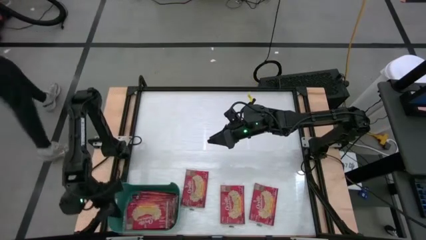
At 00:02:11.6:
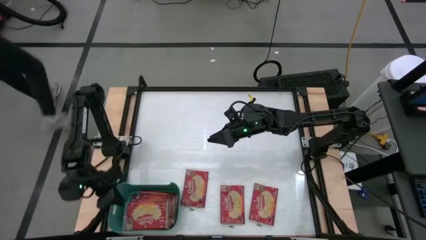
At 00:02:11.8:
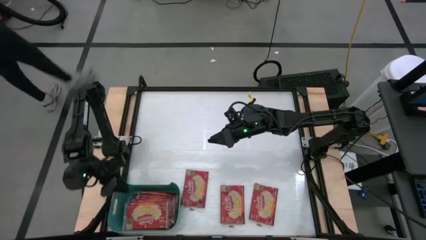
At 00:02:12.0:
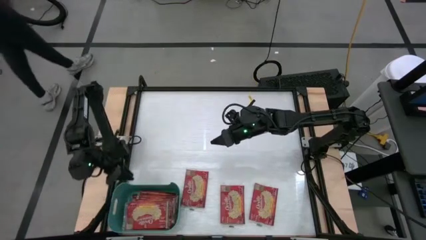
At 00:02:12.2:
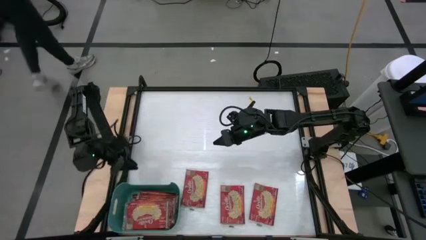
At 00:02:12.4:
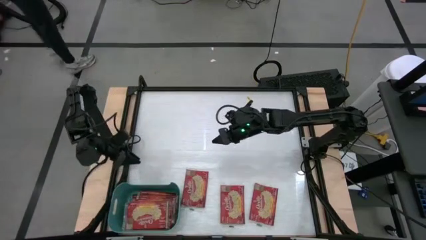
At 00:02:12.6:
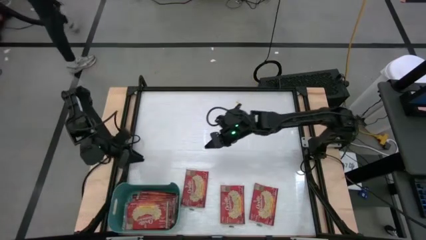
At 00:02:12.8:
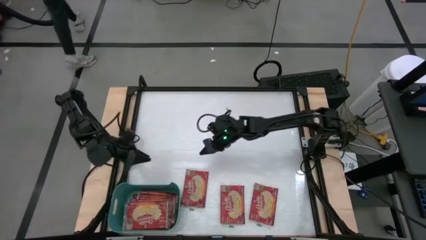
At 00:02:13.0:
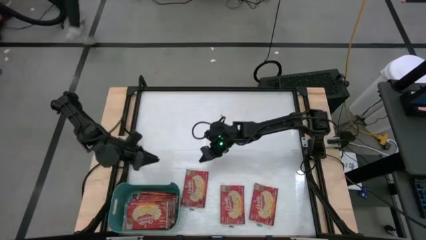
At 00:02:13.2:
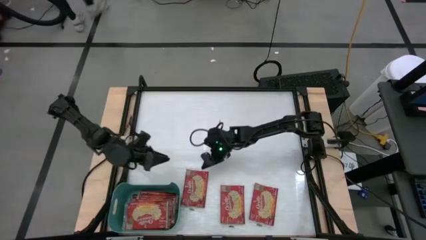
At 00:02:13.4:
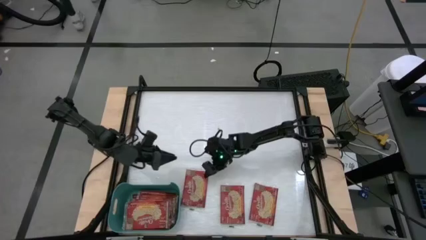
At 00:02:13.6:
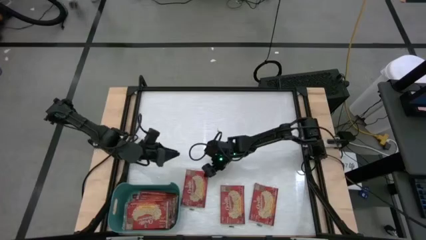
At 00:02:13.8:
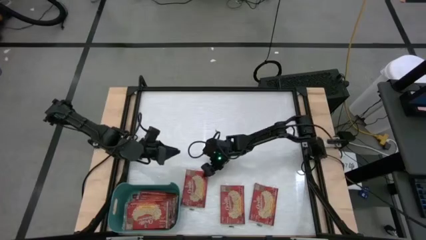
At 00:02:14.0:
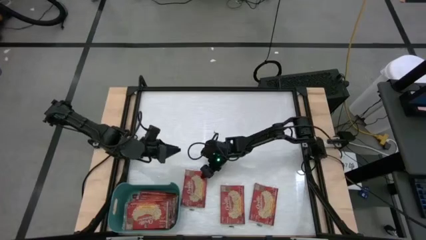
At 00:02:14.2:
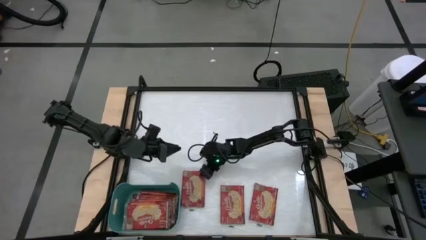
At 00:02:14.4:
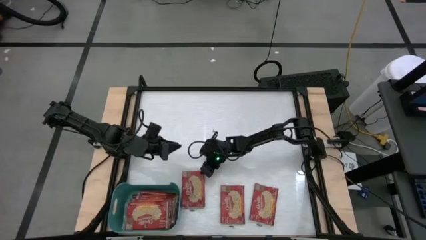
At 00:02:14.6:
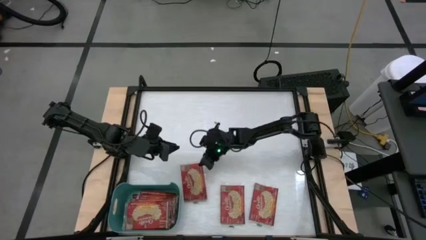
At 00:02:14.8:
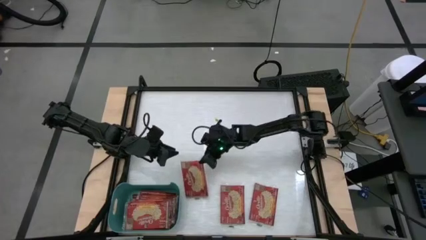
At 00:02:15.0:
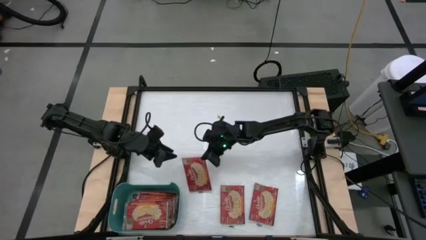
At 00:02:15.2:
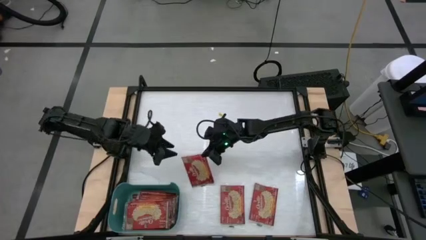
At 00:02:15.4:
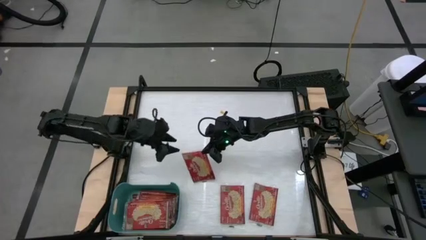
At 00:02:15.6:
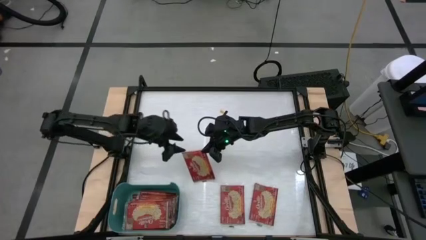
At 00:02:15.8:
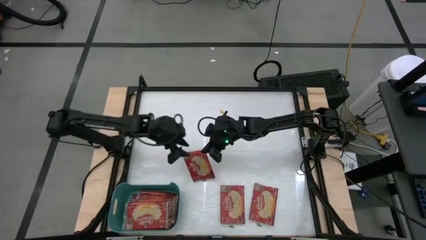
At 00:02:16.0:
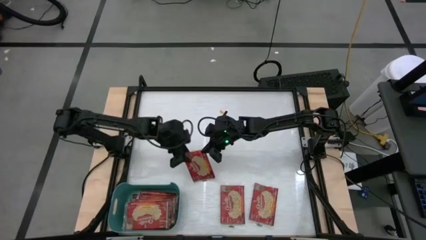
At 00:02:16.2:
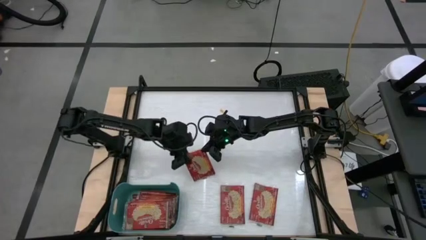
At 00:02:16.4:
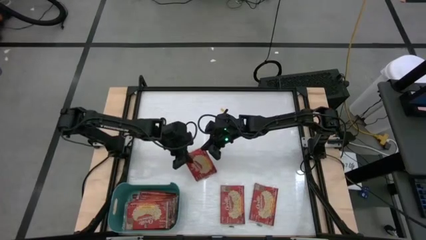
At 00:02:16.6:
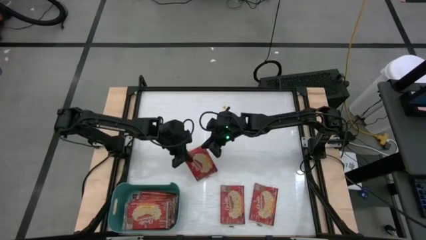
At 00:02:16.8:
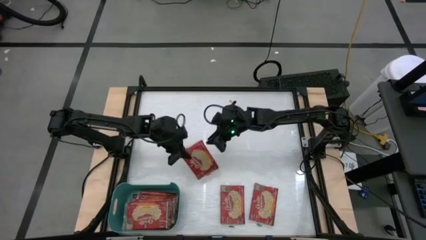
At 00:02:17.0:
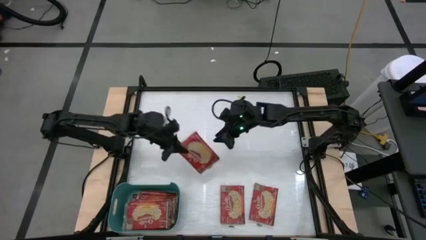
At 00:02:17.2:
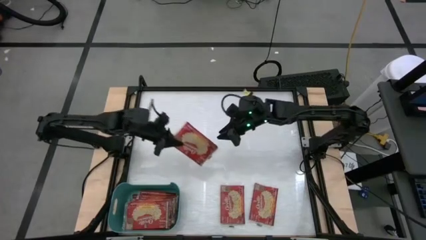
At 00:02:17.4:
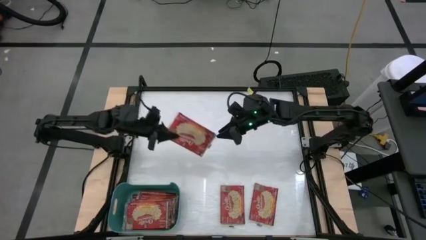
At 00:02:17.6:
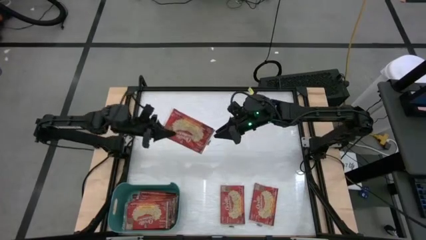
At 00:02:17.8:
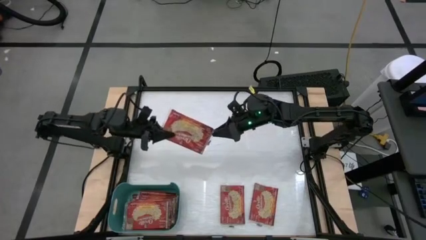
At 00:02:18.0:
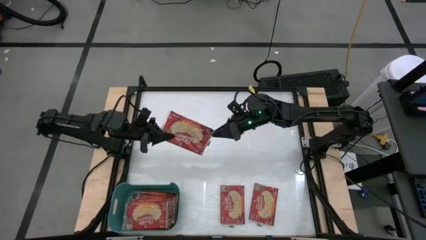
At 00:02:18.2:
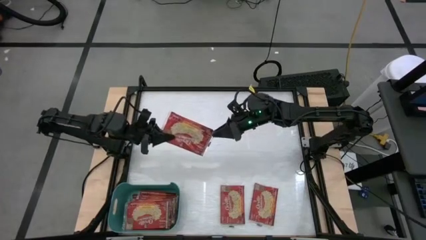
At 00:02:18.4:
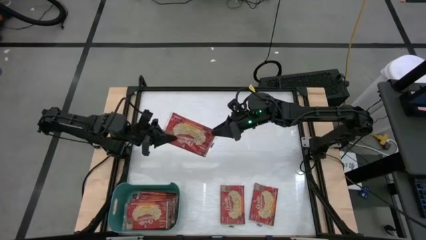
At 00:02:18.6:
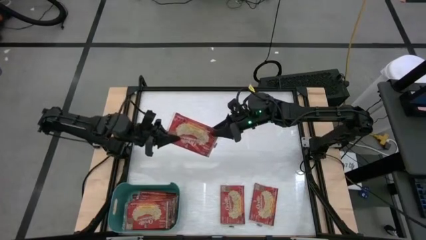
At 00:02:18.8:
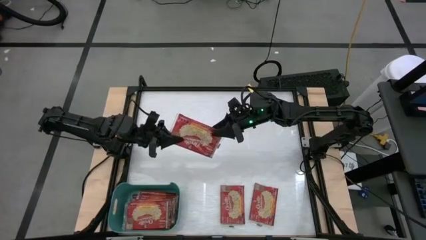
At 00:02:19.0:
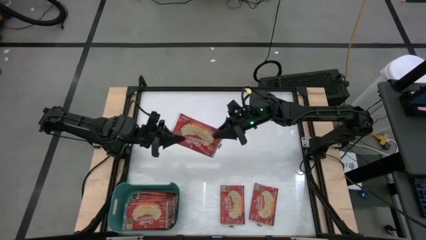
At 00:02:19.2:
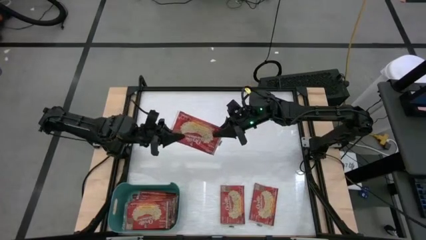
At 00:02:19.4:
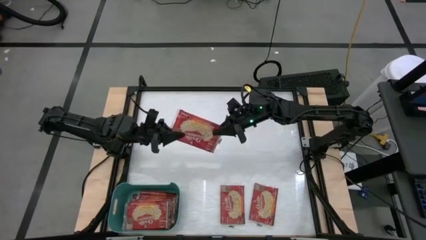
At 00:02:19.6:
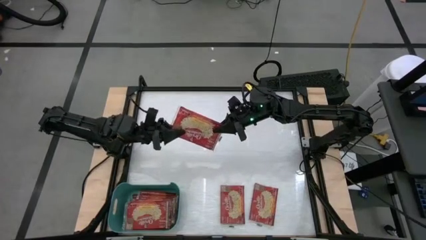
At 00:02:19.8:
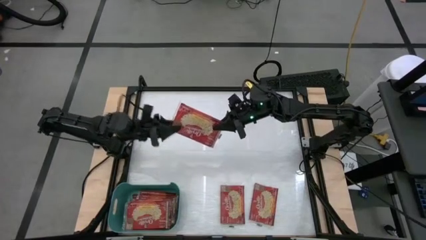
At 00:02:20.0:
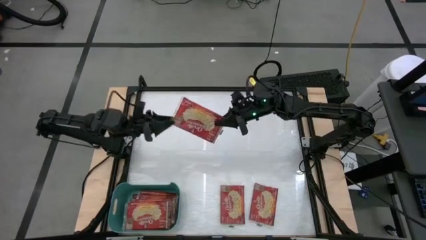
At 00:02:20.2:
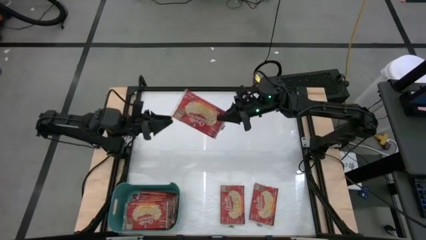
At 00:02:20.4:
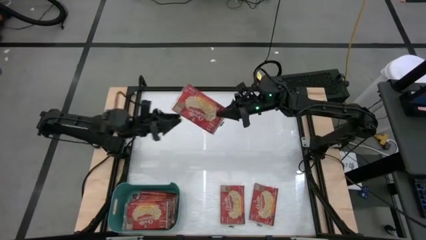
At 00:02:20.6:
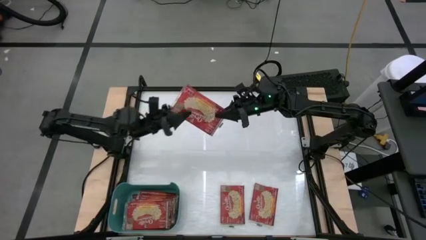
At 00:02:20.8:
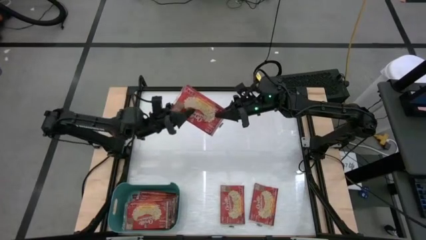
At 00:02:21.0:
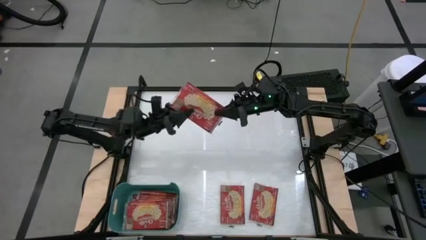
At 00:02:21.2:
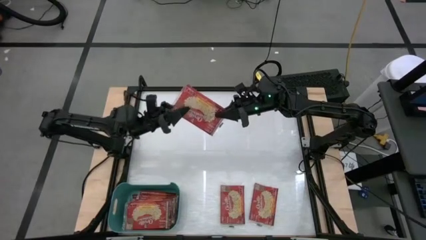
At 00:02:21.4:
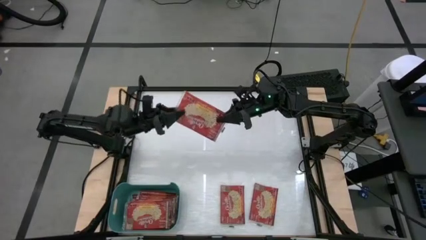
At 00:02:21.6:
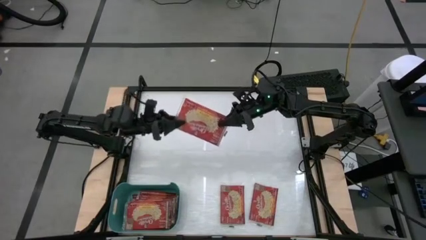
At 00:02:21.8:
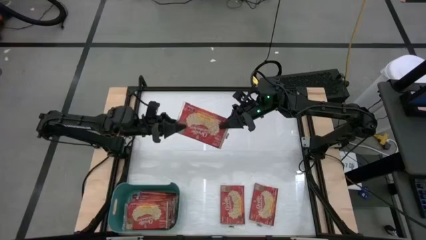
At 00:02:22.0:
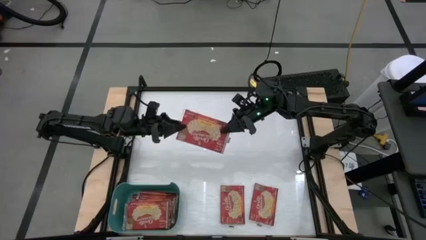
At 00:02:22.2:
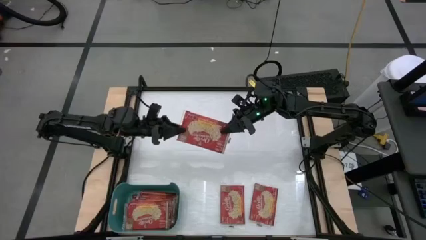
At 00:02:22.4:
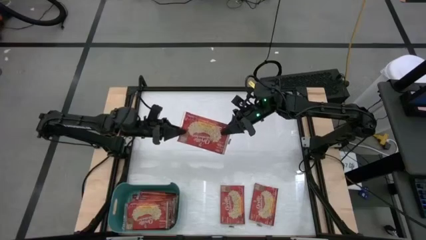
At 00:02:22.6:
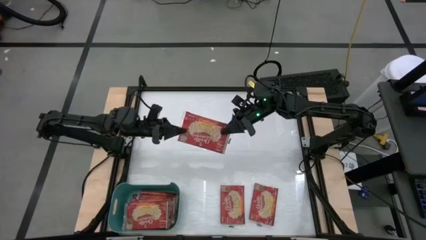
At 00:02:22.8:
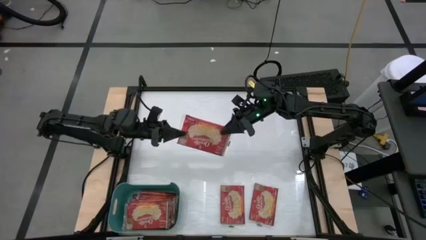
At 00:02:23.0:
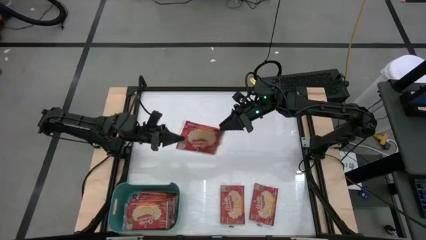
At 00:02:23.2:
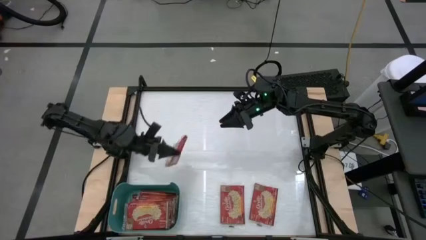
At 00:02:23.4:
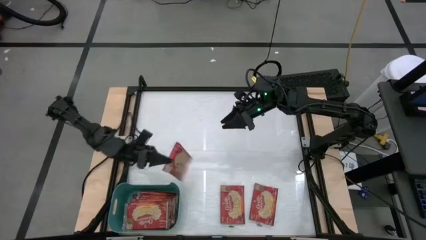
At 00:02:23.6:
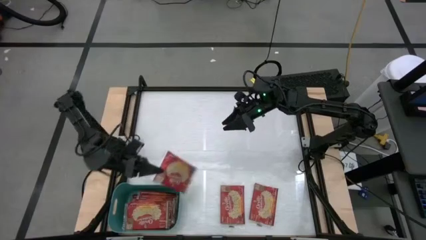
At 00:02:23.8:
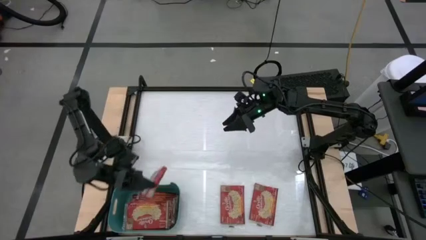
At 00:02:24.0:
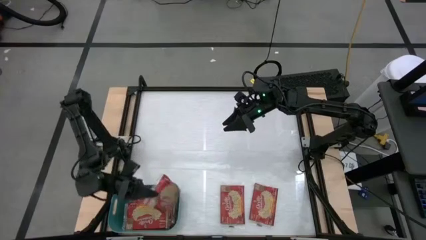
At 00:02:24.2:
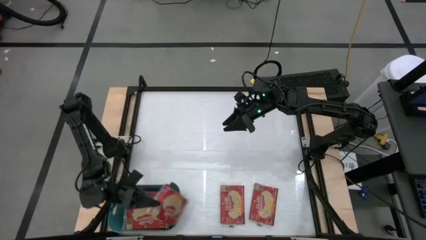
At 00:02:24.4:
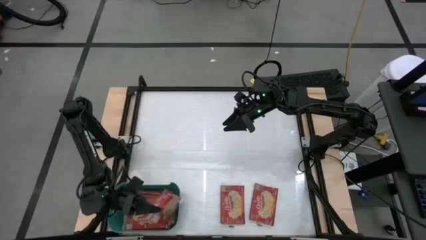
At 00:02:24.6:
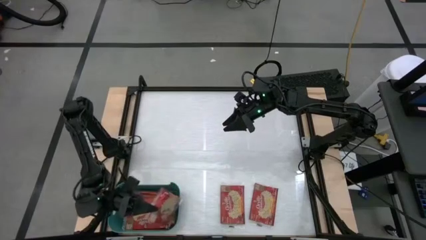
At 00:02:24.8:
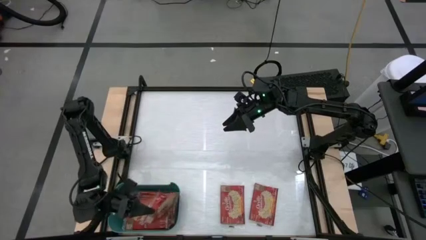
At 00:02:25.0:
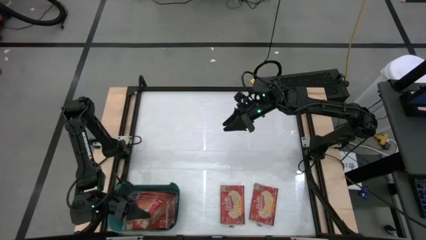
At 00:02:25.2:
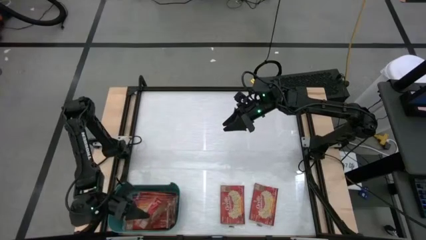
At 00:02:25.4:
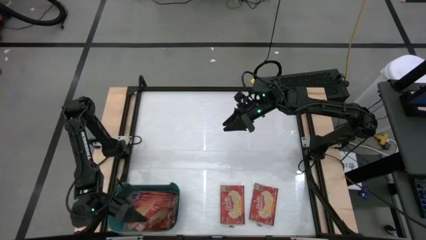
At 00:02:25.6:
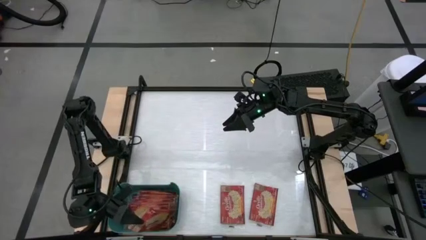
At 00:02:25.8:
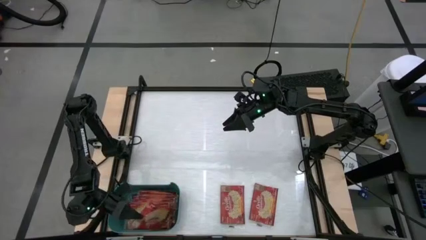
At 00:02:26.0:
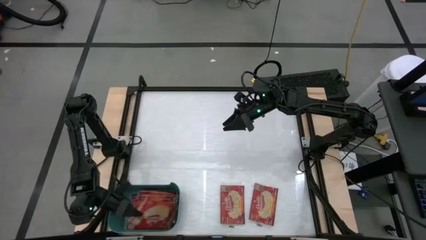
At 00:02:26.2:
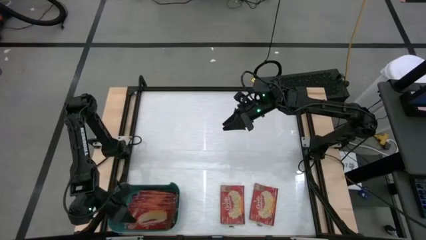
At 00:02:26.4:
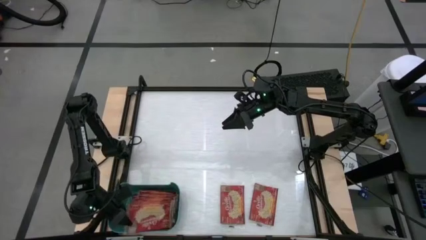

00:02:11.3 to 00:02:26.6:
Task: Sort popcorn bags into baskets
Put the red popcorn bag into the green bin
